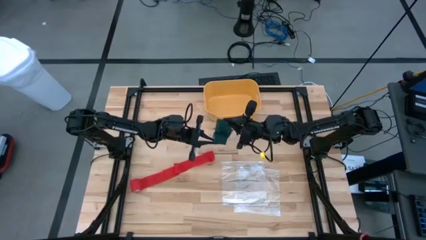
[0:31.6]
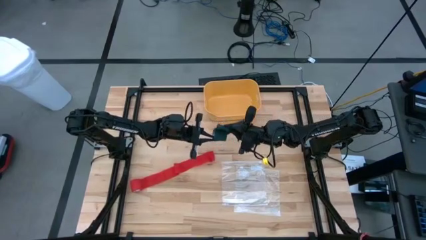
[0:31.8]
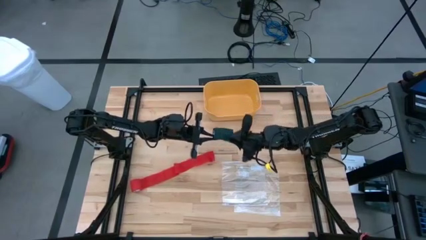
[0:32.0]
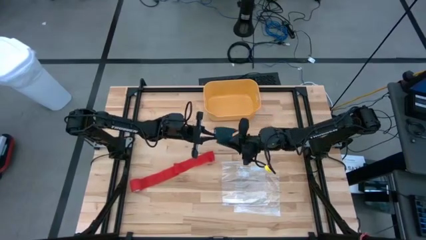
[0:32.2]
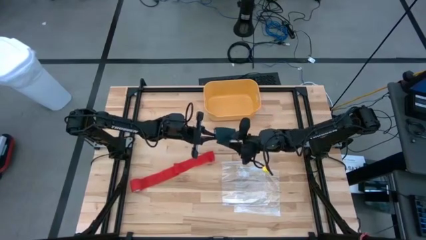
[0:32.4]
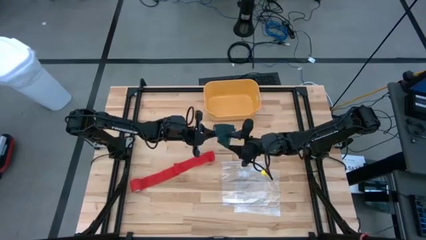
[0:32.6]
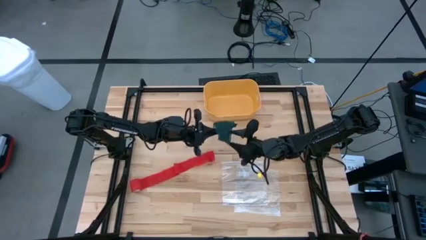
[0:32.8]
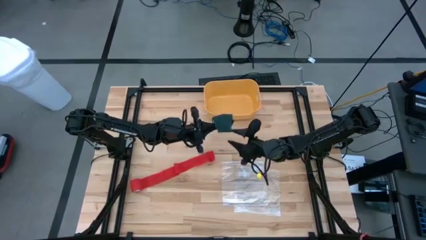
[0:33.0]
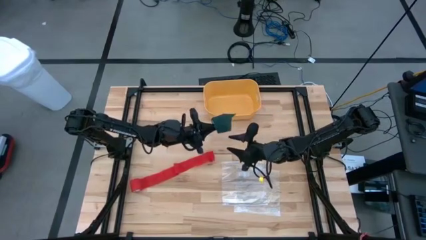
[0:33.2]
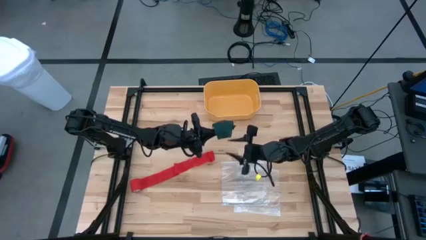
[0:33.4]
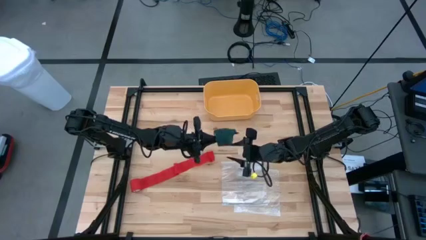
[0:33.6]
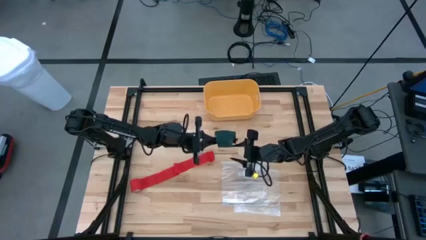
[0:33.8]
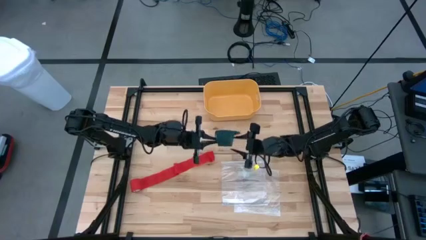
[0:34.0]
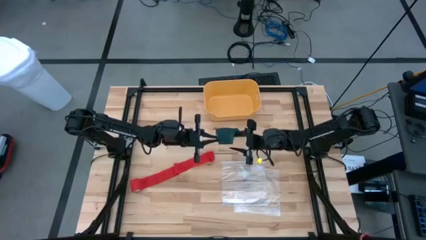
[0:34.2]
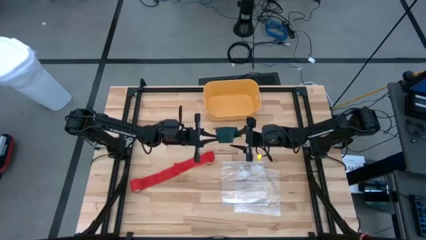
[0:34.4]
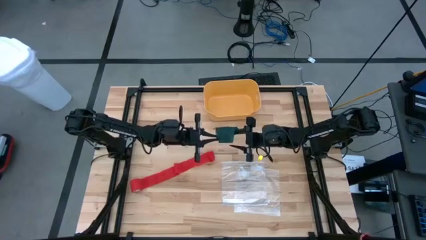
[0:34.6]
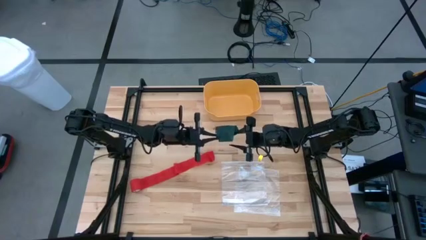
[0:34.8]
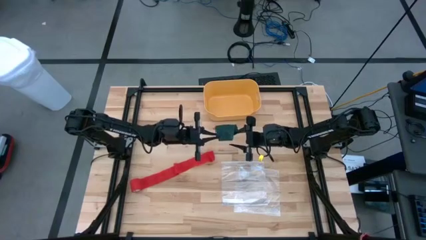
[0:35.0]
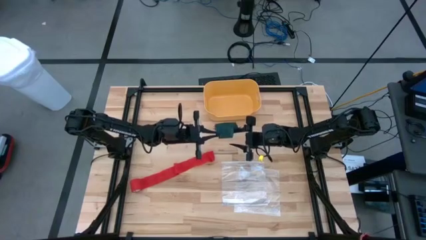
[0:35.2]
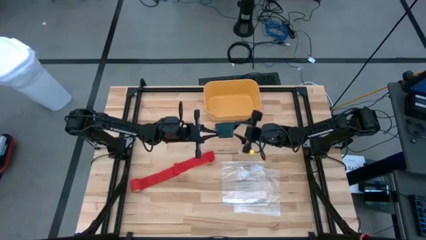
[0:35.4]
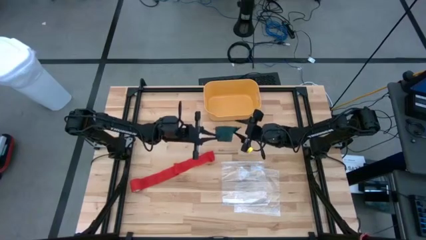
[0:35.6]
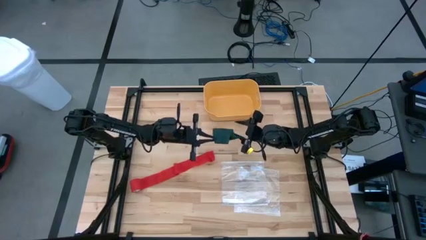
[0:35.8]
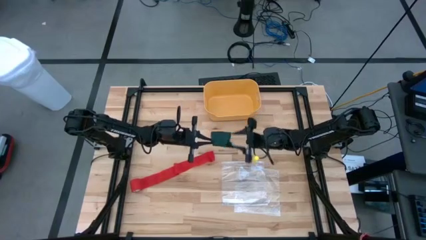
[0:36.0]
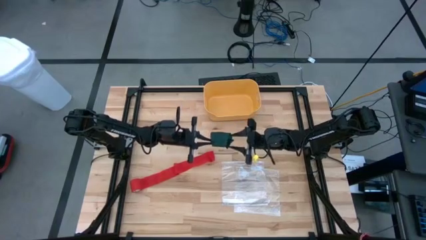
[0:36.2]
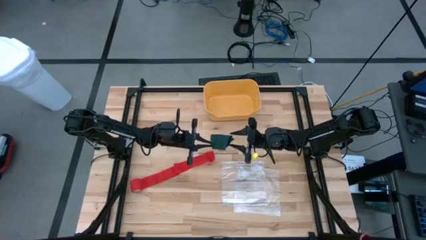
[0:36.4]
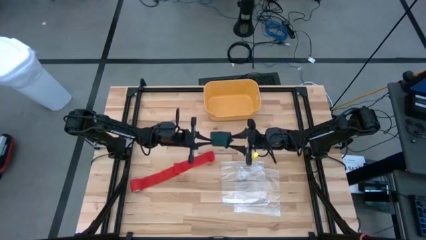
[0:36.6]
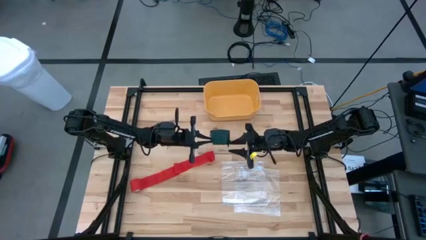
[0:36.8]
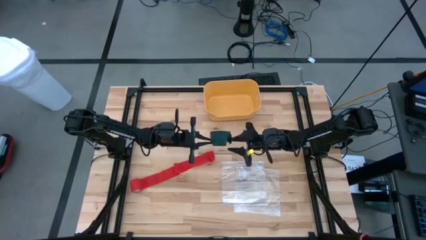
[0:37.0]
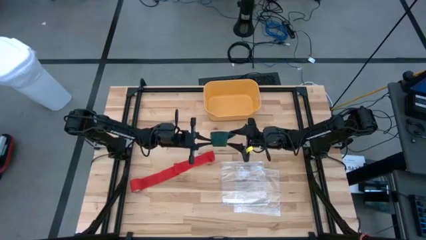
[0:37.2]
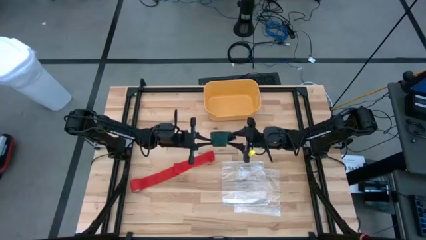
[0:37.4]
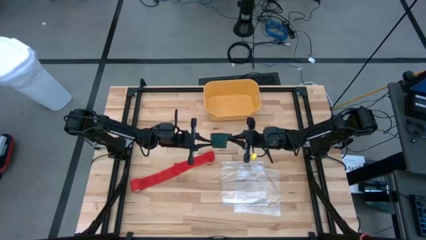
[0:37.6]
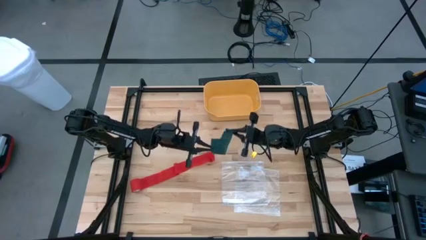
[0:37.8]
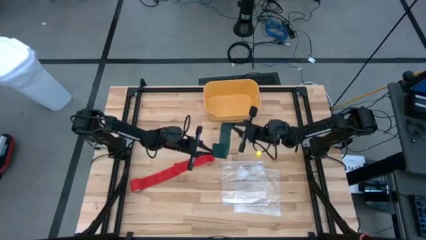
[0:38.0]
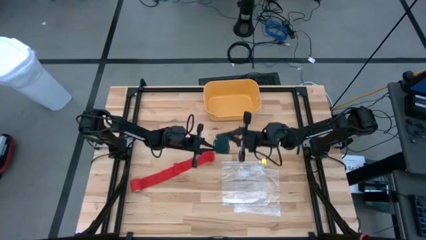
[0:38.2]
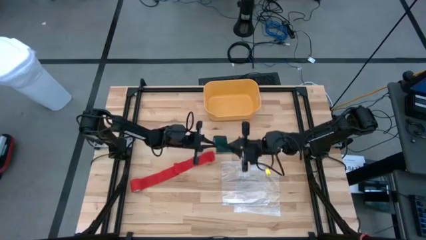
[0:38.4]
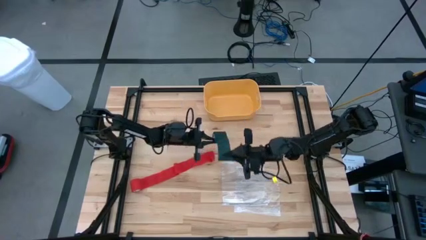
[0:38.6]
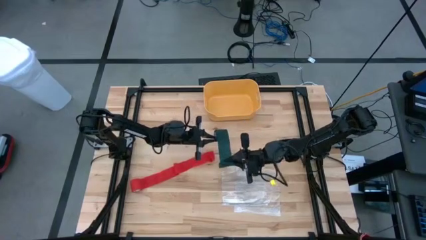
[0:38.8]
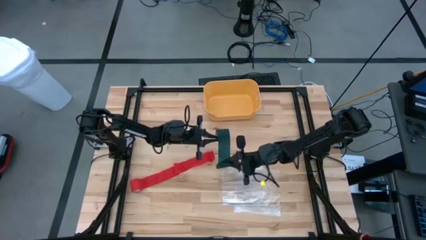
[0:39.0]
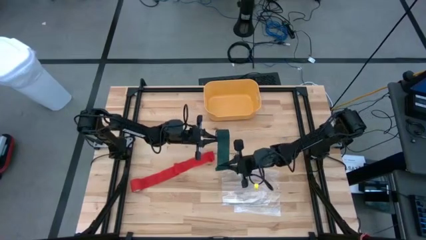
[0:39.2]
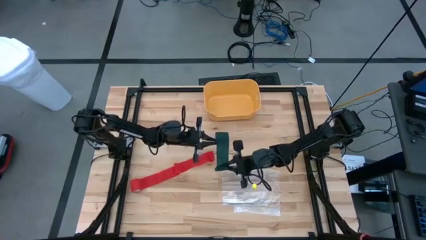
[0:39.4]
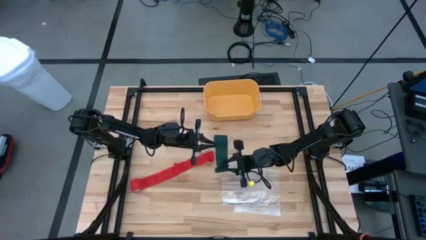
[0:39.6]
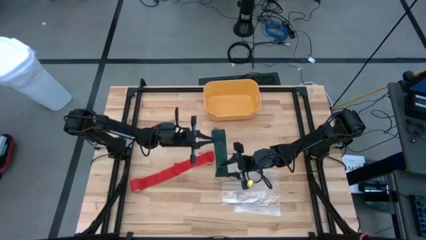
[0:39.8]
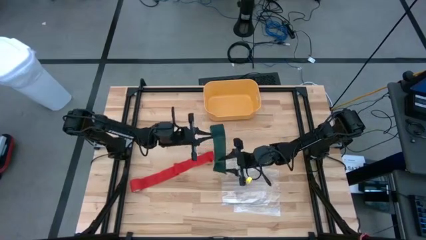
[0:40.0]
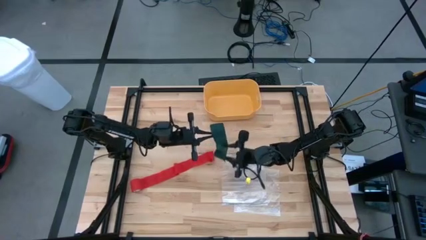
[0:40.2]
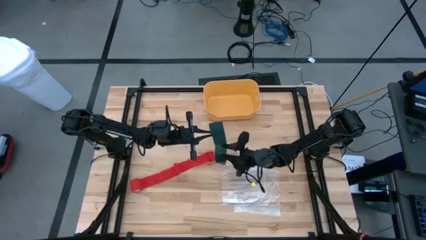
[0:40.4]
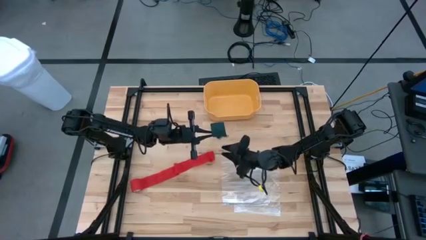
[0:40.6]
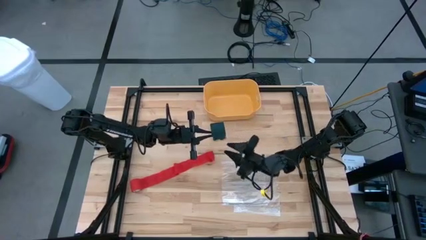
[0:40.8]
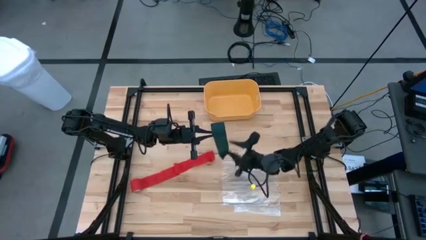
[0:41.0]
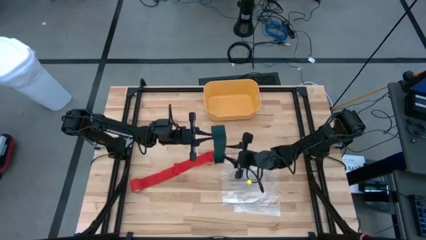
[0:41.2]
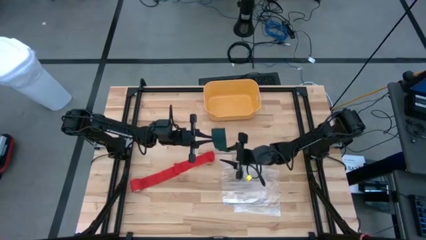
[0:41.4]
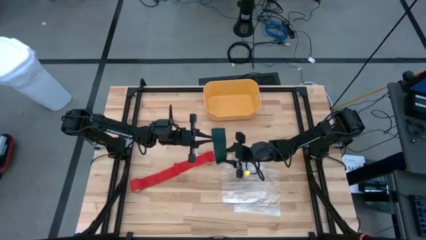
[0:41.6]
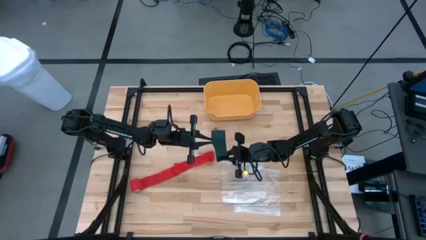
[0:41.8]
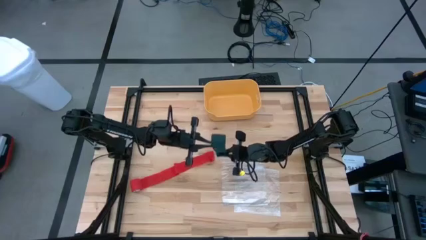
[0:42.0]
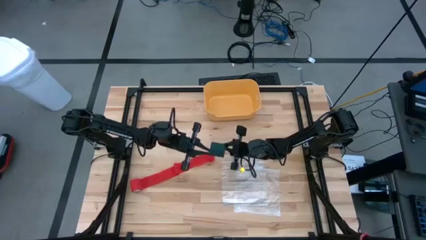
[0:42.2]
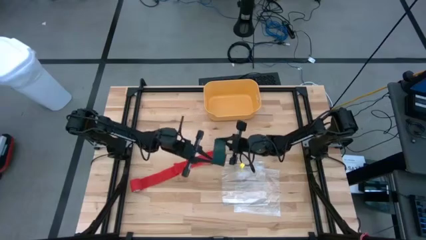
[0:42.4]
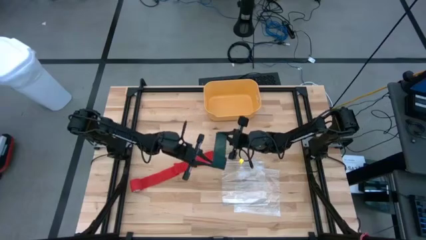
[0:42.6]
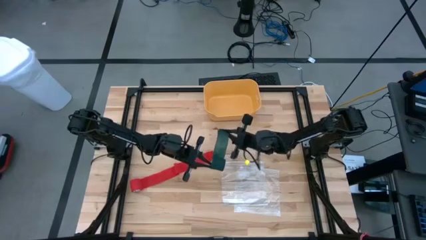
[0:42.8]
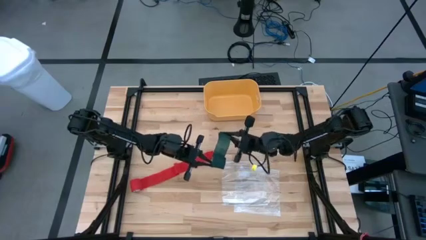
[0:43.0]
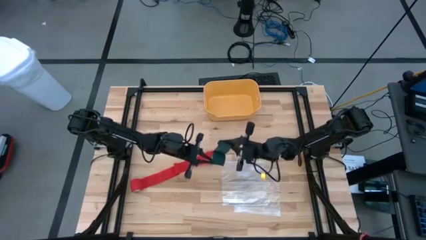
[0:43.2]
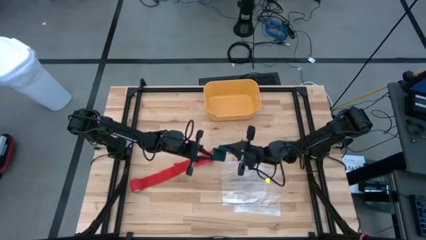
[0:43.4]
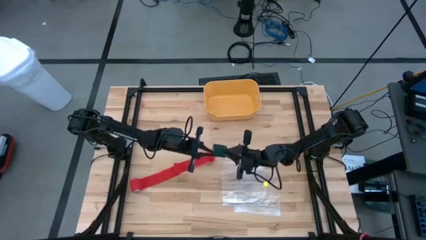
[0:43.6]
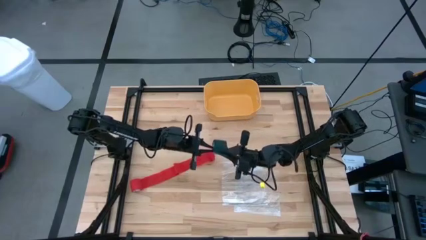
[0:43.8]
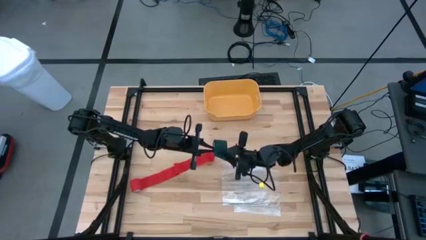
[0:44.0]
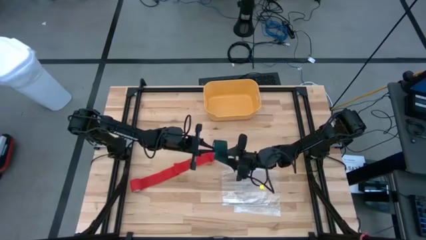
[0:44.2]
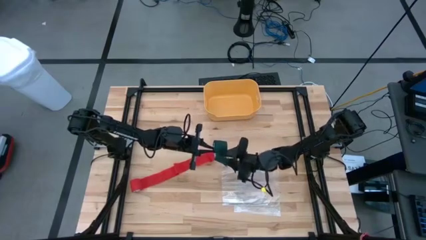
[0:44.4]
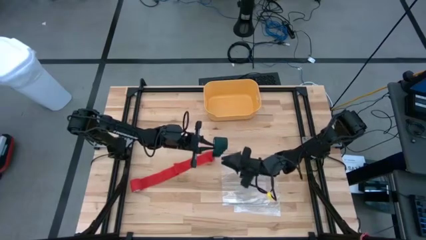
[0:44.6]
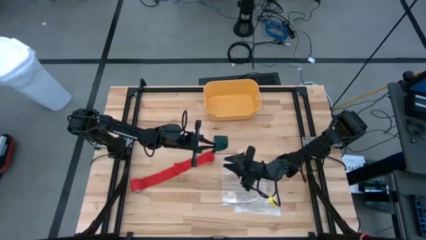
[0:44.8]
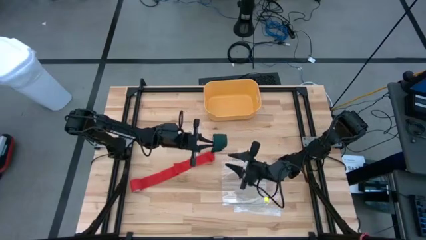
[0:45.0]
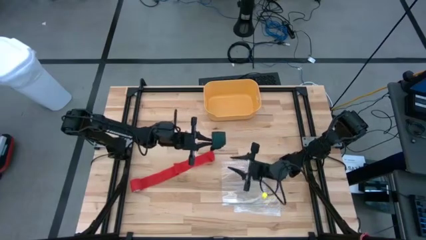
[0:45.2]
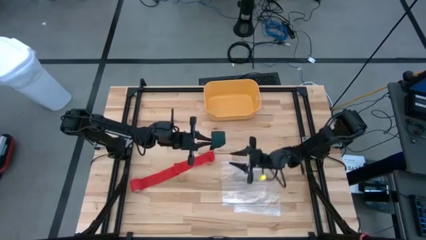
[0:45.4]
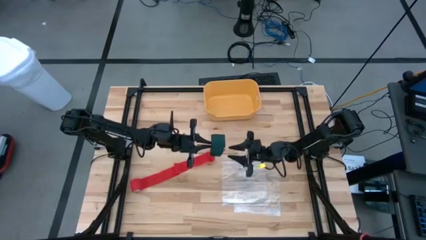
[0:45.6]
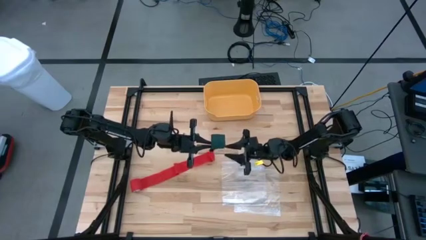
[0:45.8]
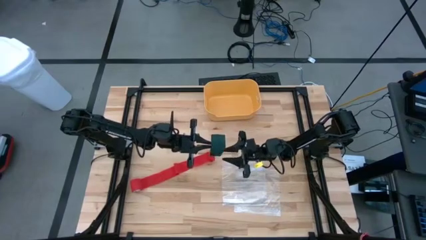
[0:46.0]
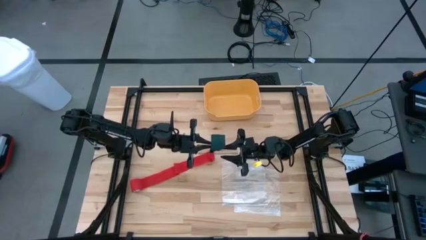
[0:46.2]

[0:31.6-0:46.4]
Task: Roll bandage
Roll the green bandage
